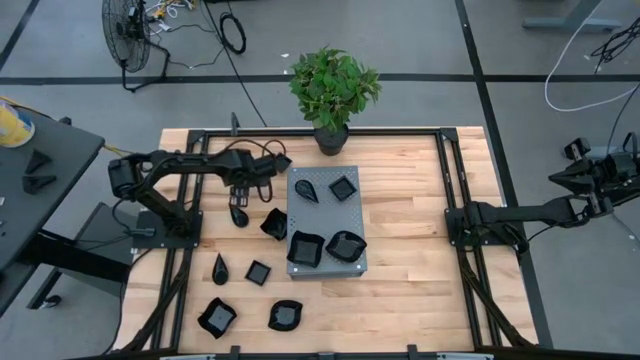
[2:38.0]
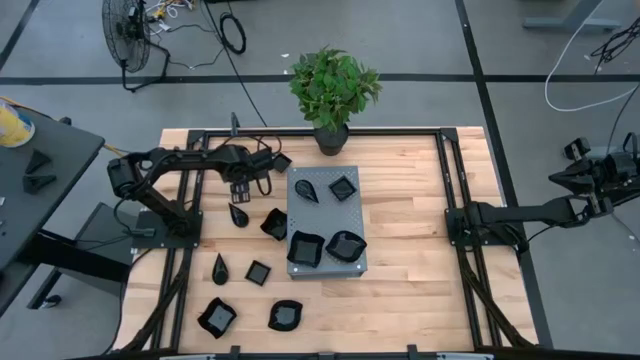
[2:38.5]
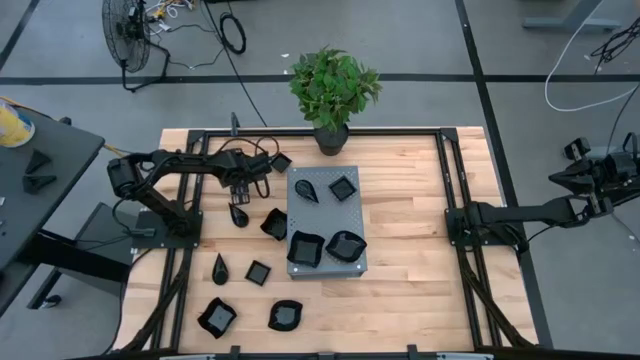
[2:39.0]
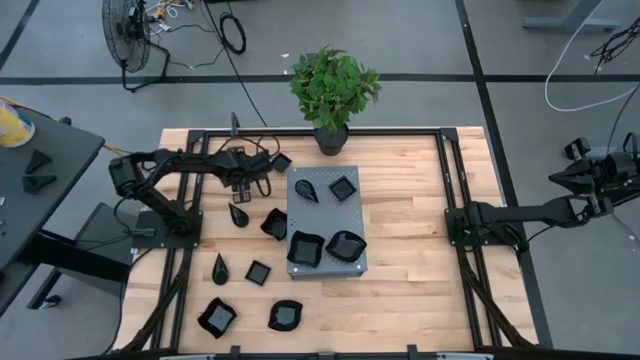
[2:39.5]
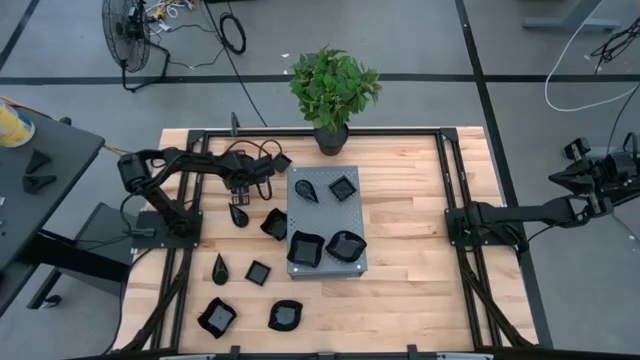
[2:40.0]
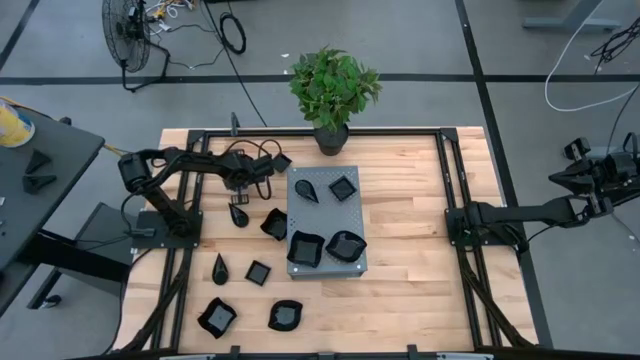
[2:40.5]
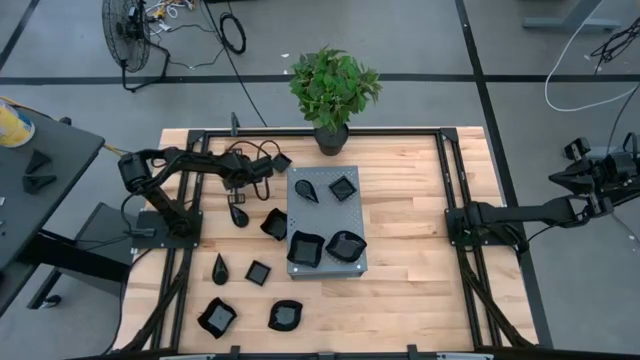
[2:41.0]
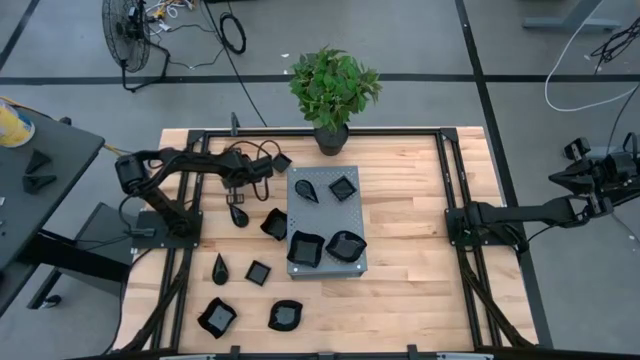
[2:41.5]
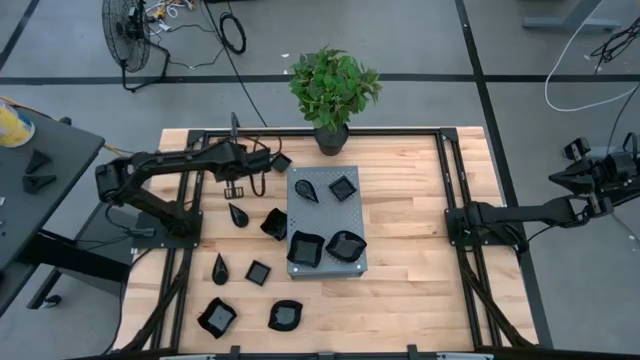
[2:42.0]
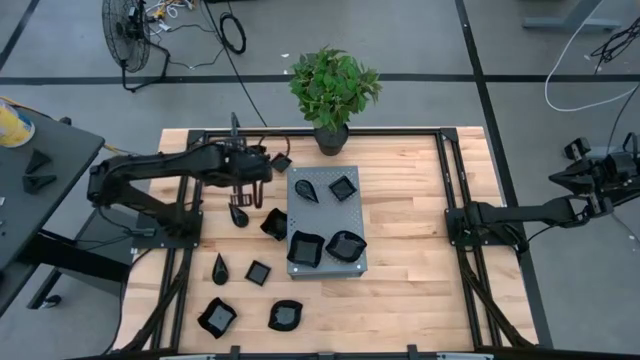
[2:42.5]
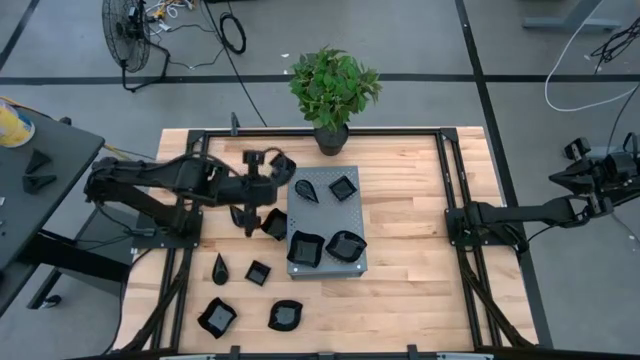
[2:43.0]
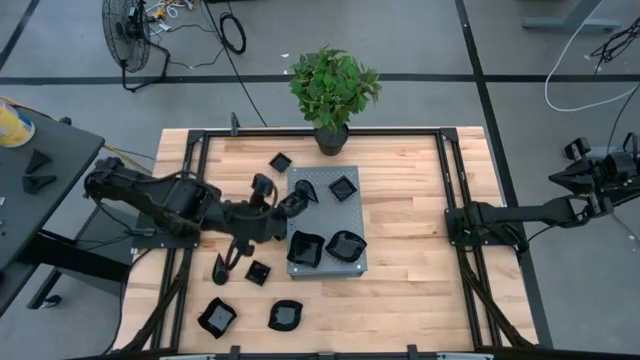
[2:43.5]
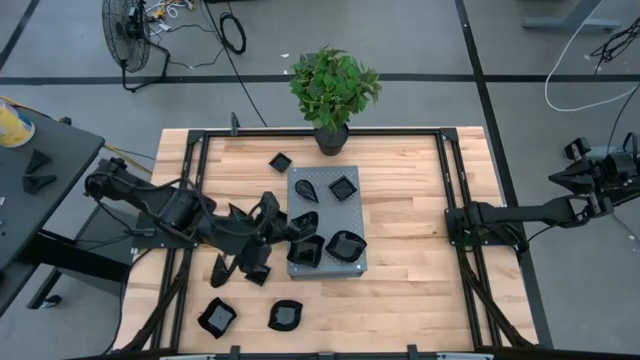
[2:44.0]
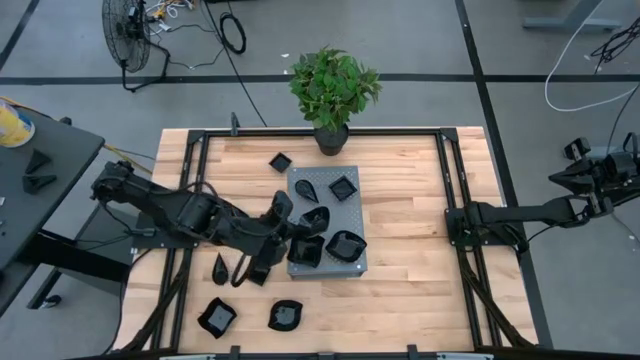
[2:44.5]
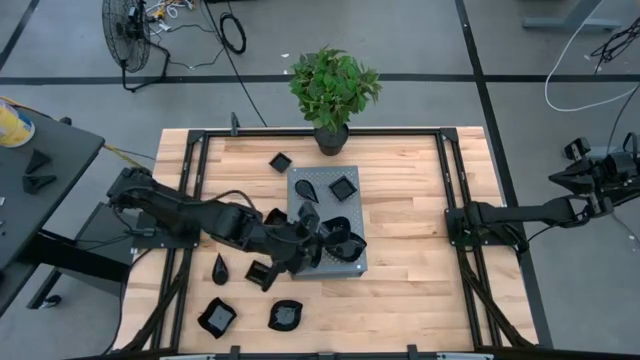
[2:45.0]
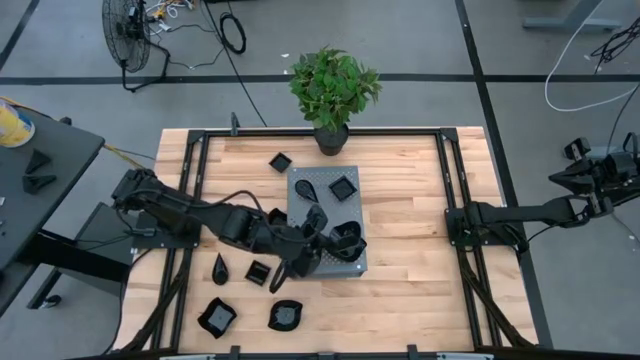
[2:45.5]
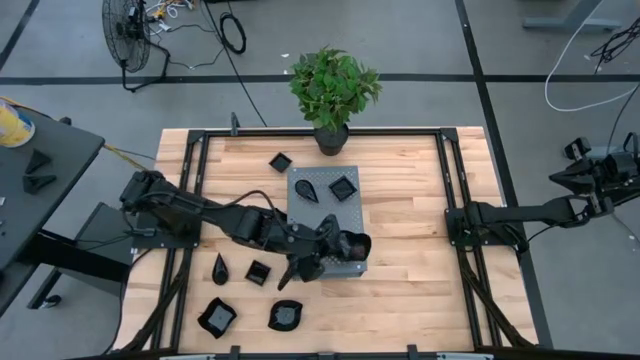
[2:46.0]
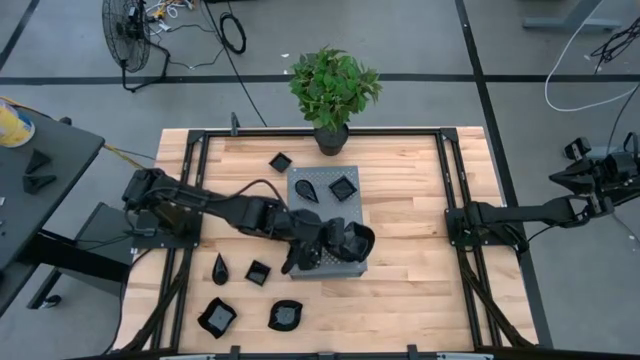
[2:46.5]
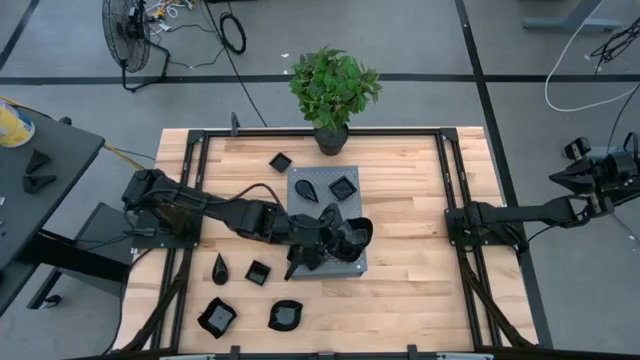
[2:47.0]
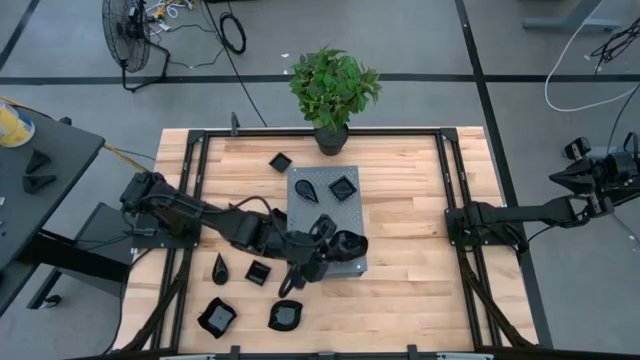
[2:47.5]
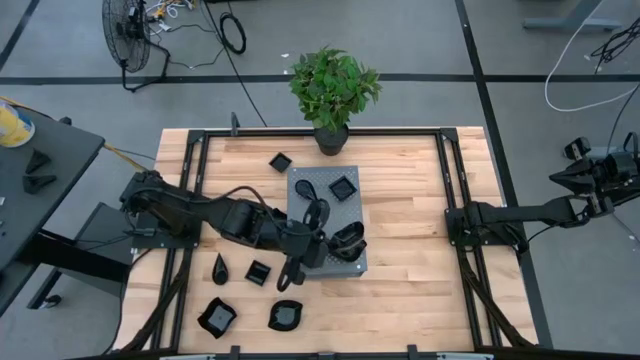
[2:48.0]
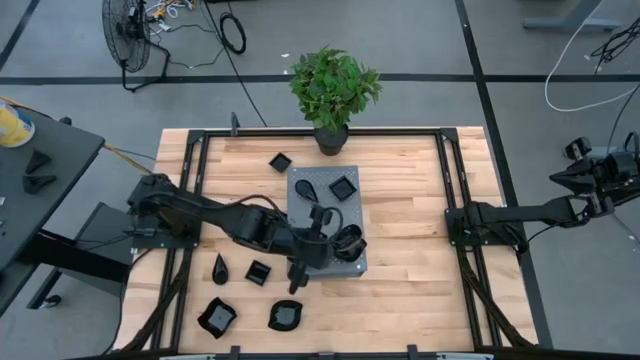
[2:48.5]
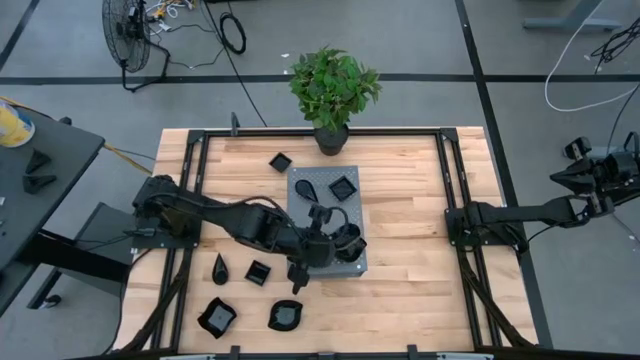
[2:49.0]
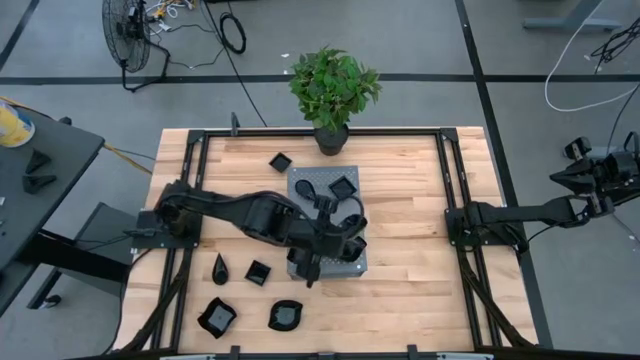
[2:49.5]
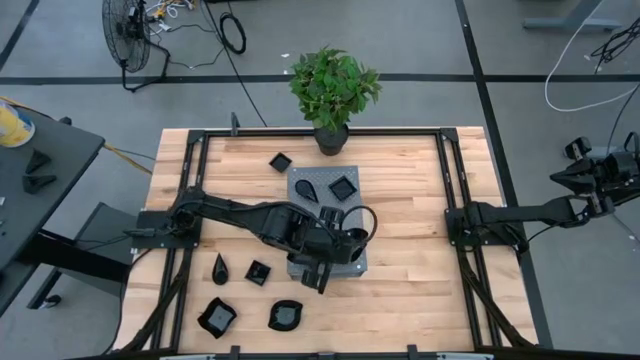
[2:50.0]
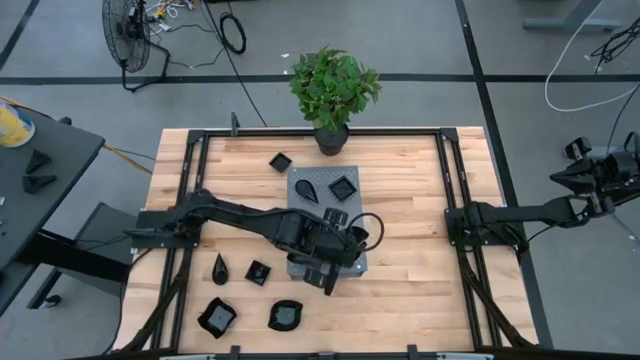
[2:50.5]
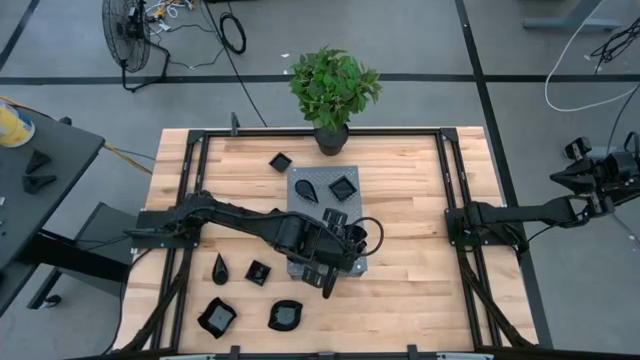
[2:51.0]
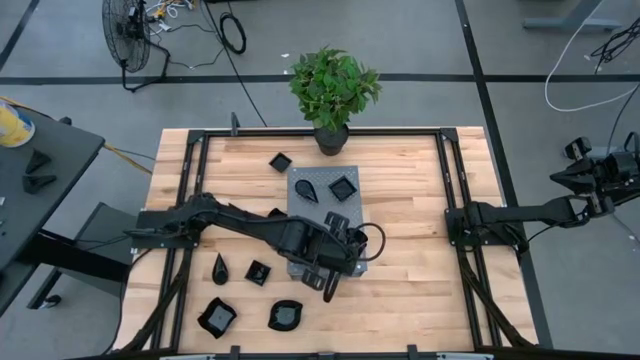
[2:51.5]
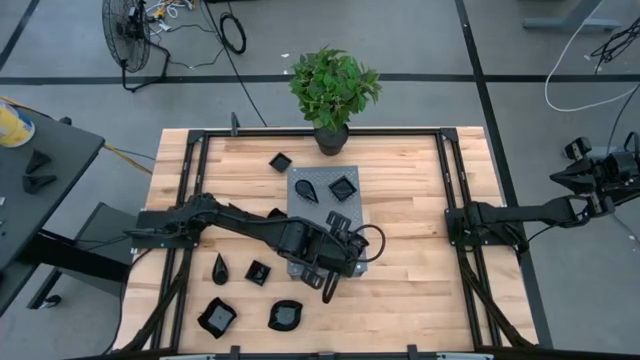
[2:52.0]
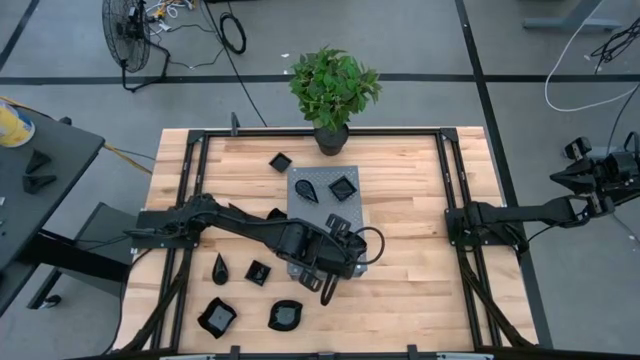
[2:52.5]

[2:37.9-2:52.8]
Task: Pick & Place Mini shaped plates
Stack the black bowl on top of the black bowl on the shelf

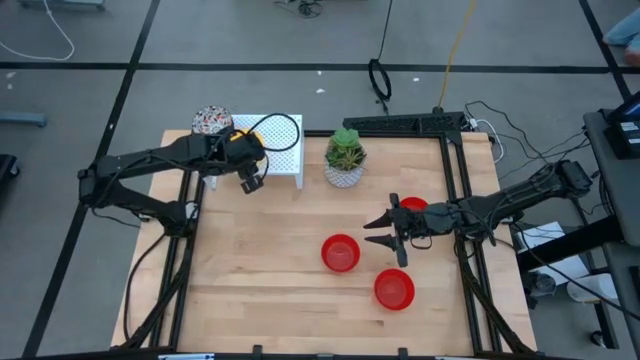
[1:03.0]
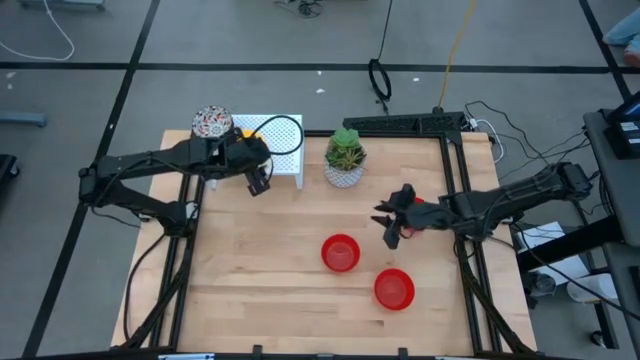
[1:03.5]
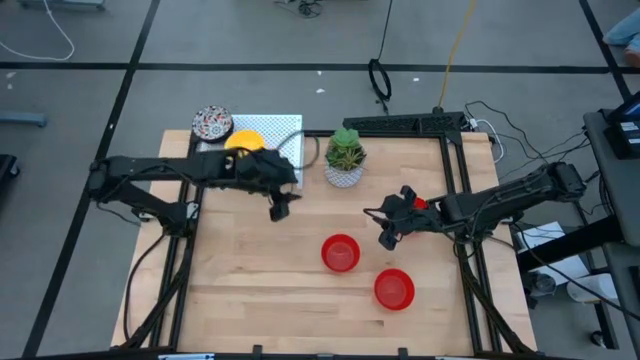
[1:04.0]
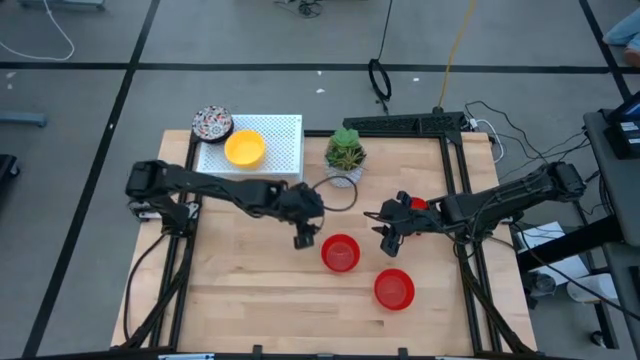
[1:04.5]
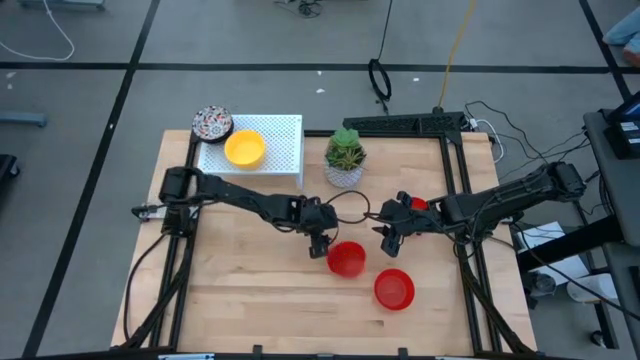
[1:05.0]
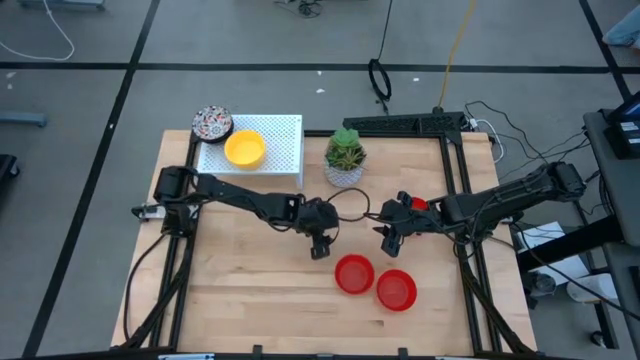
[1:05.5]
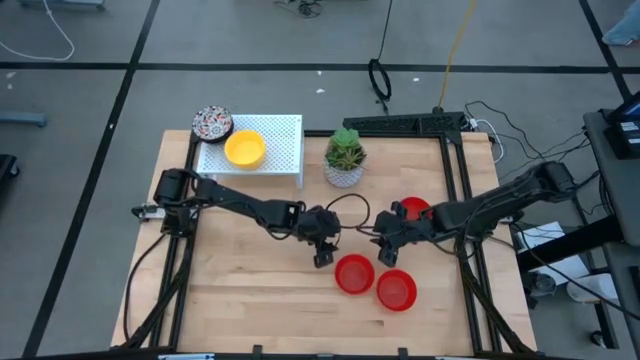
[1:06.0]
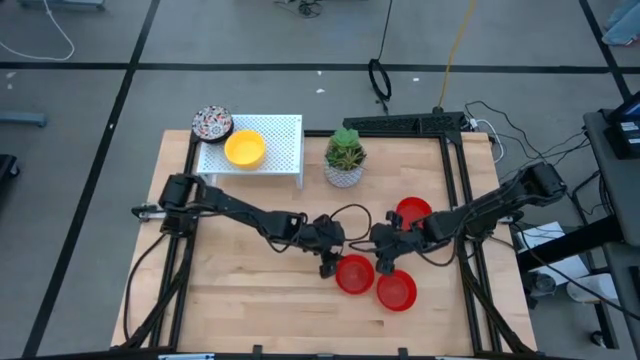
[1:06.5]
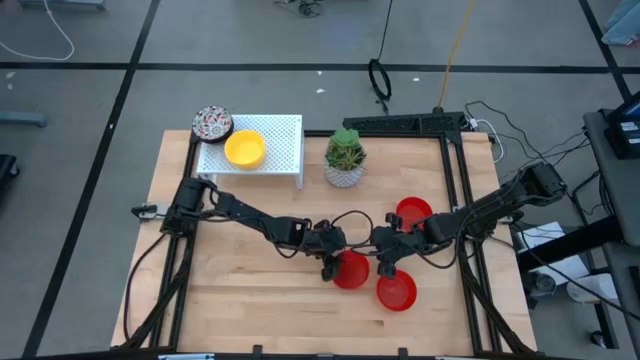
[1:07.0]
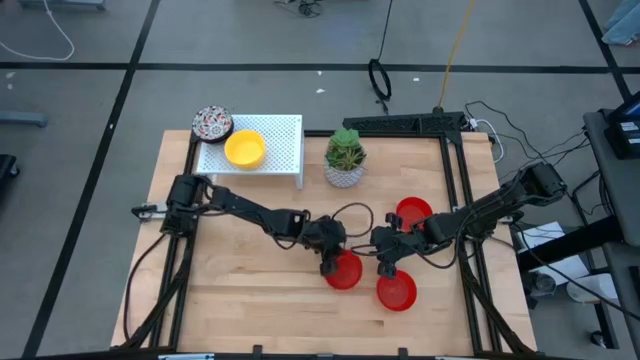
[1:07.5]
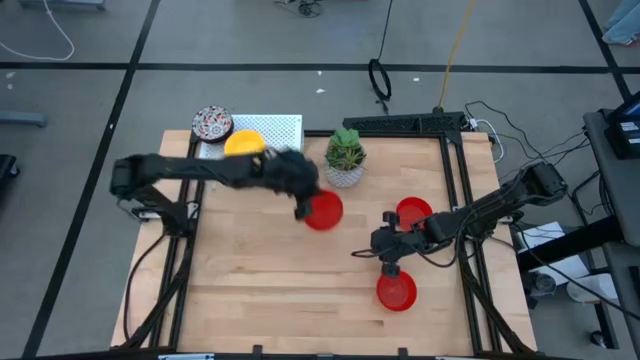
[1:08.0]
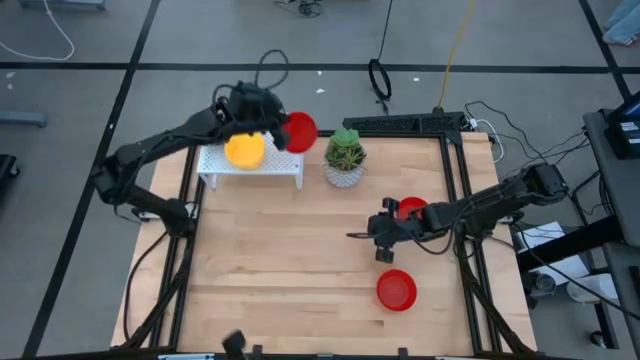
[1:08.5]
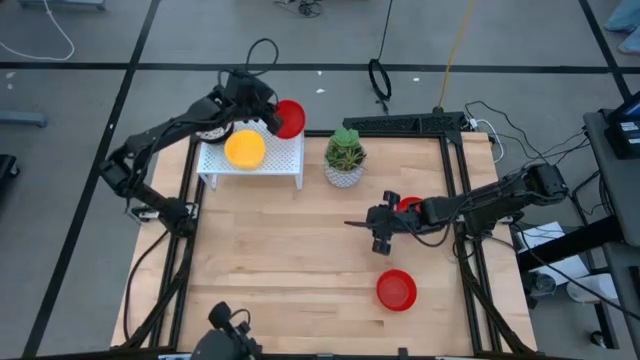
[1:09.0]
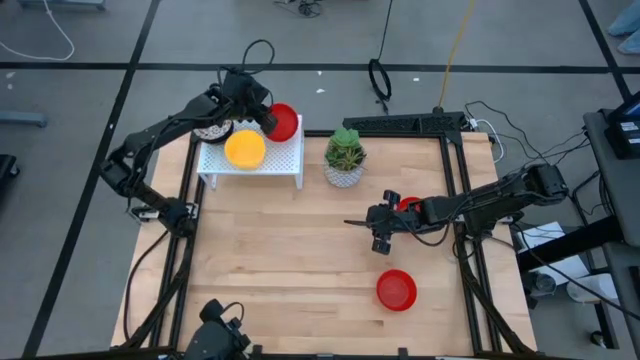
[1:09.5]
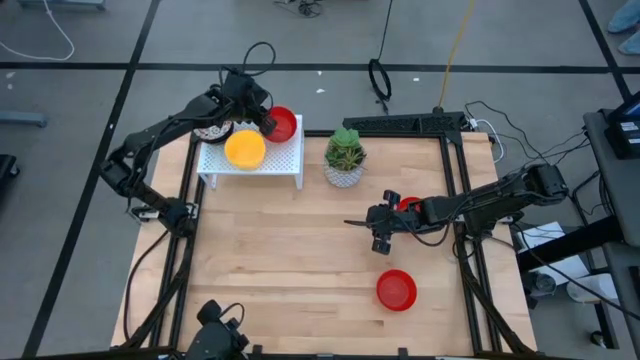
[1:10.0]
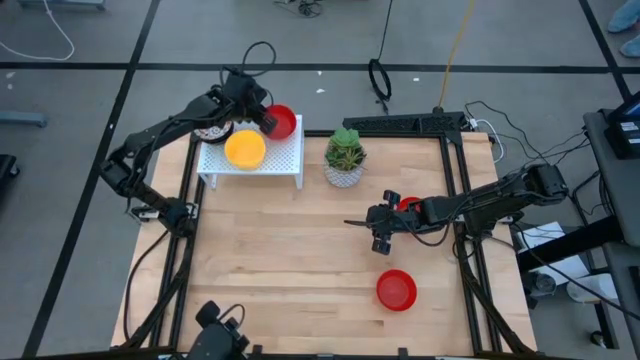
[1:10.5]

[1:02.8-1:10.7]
Task: Pick & Place Mini bowls
Put the red bowl on the shelf
